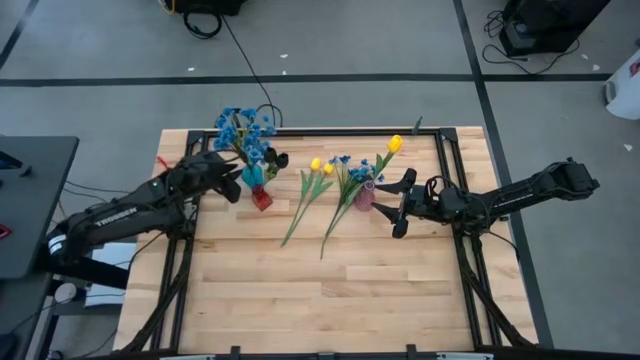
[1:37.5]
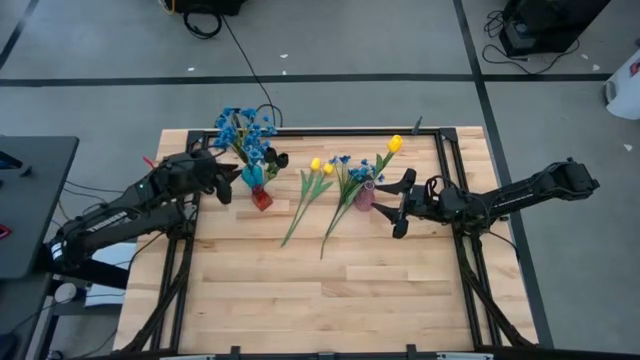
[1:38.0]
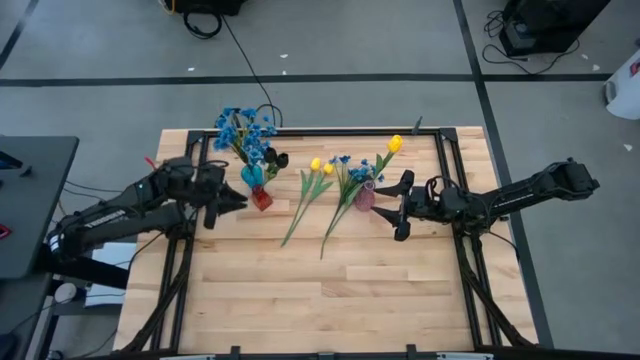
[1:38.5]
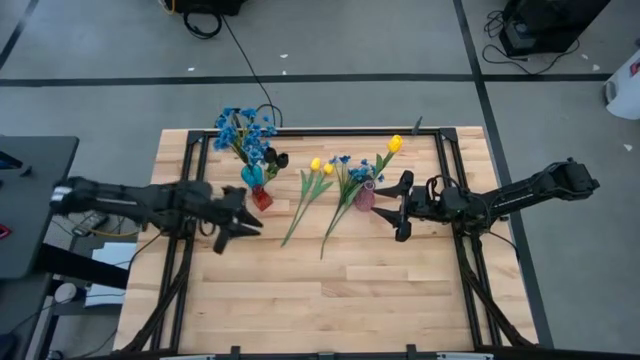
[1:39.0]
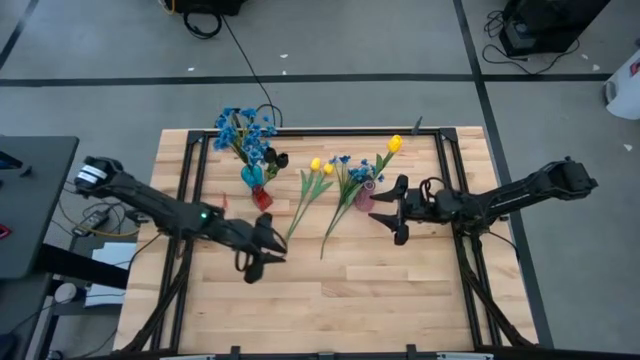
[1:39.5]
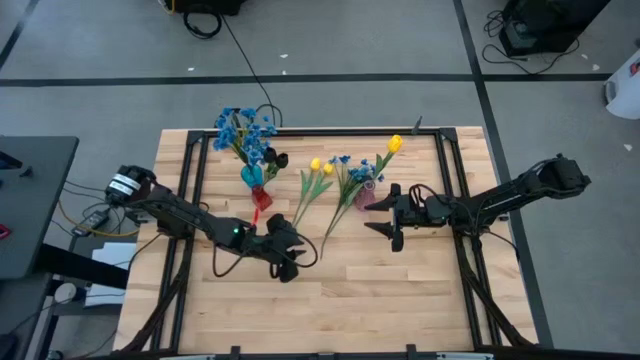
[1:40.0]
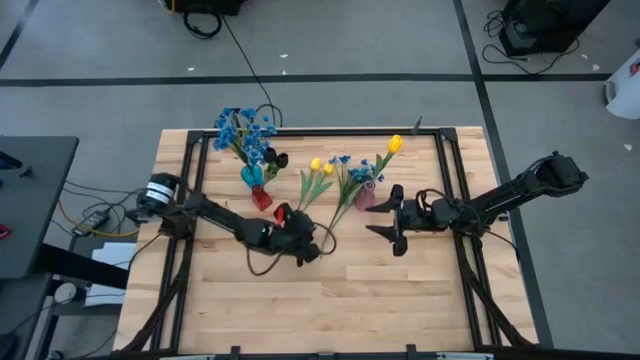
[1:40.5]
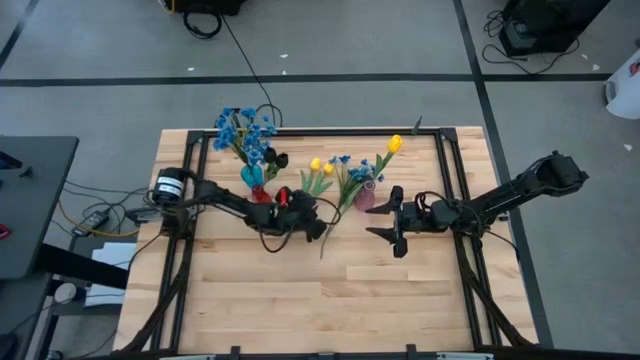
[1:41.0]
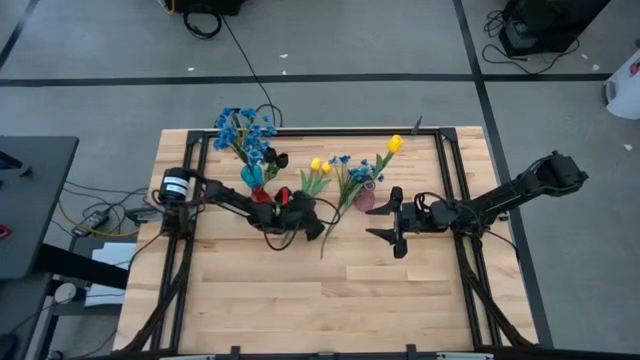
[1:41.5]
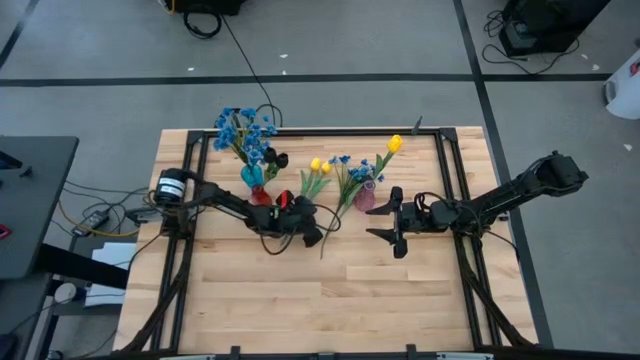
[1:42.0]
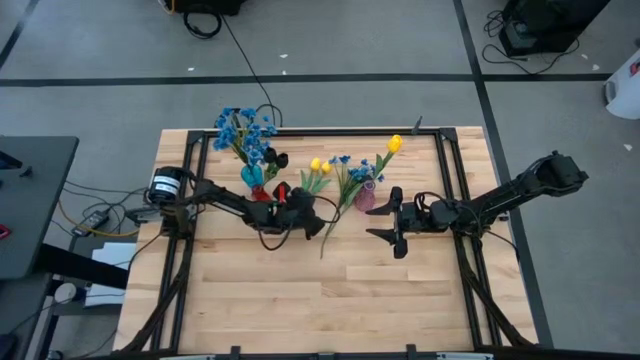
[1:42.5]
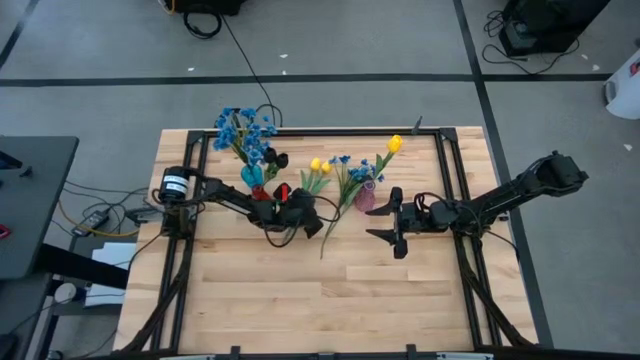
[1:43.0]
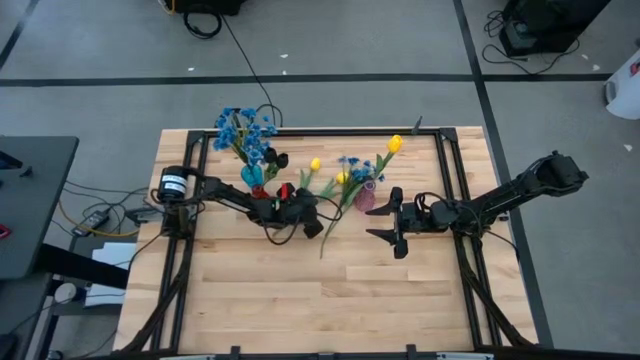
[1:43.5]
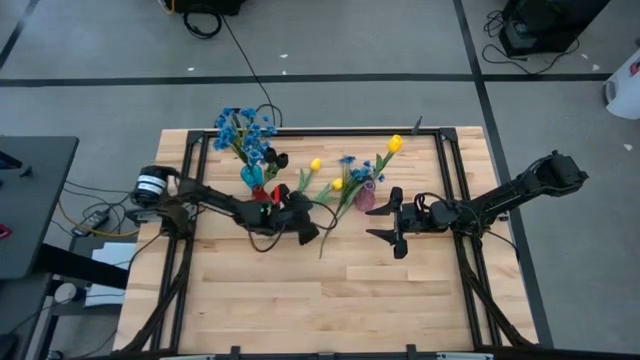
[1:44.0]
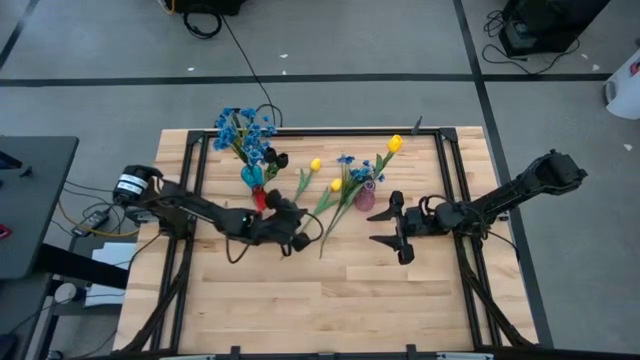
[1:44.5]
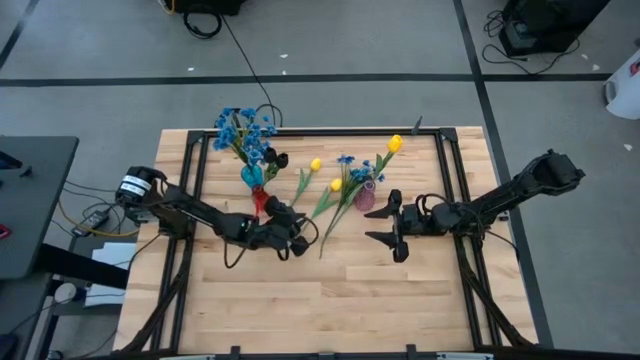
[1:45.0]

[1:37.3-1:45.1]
Task: Sort flowers into vase by color
Put the yellow flower into the pink vase

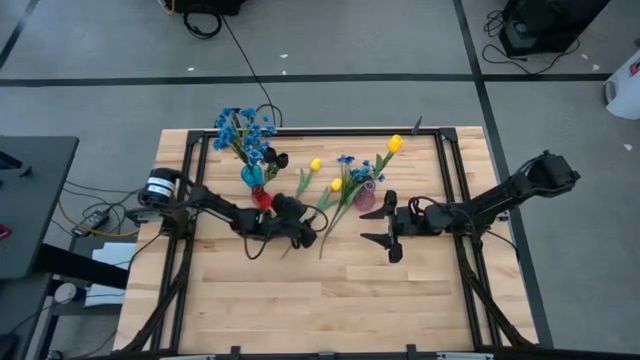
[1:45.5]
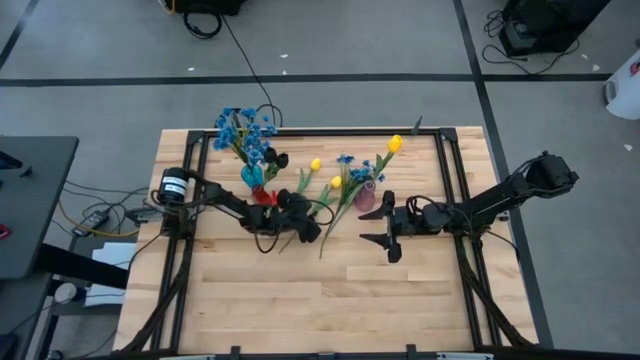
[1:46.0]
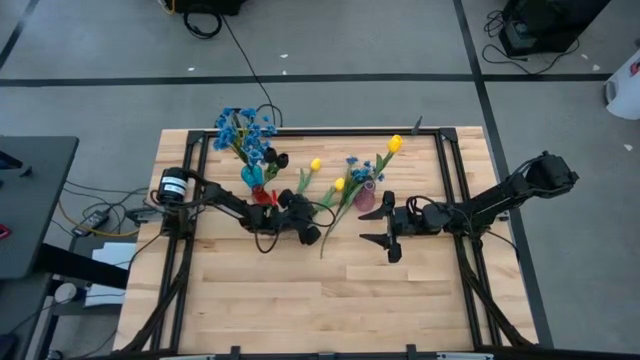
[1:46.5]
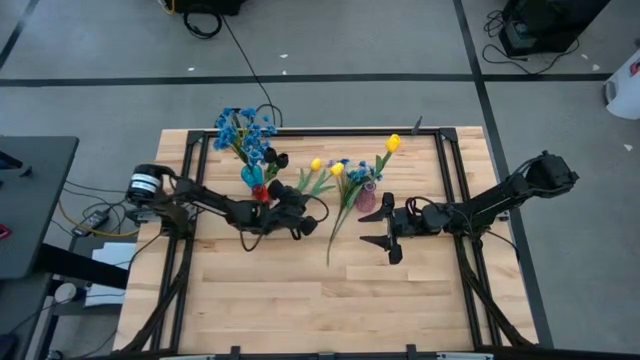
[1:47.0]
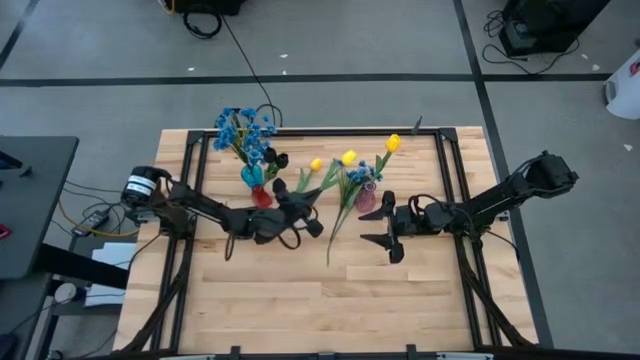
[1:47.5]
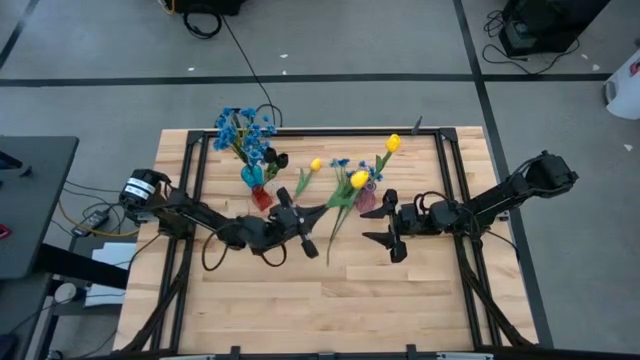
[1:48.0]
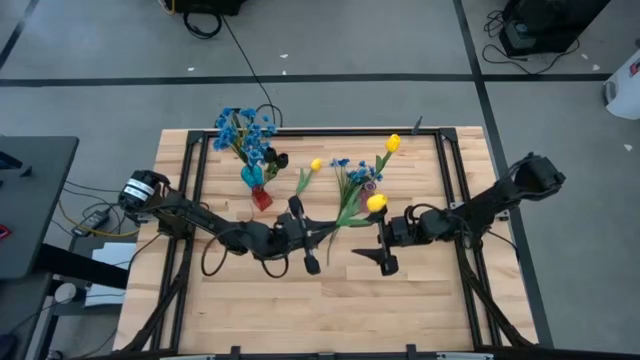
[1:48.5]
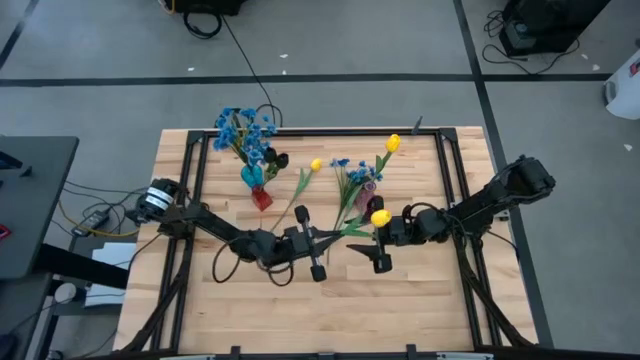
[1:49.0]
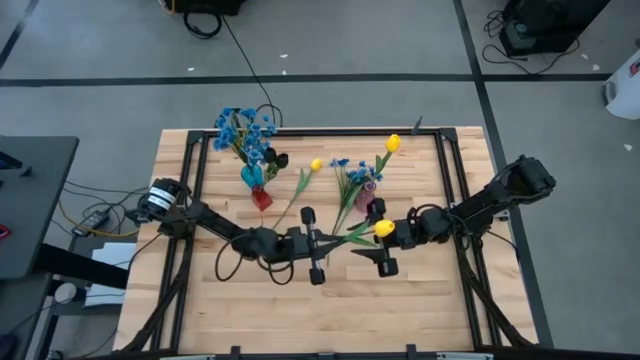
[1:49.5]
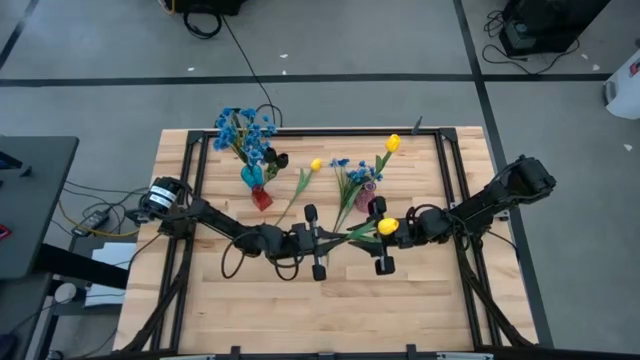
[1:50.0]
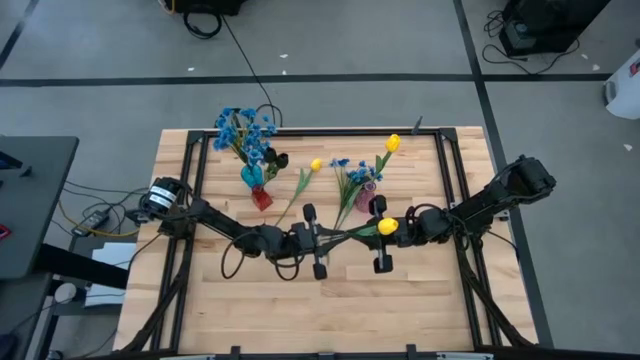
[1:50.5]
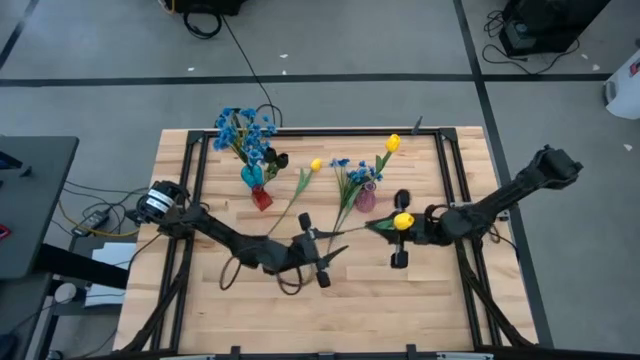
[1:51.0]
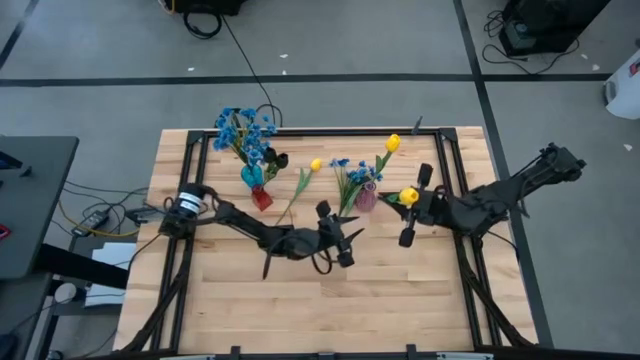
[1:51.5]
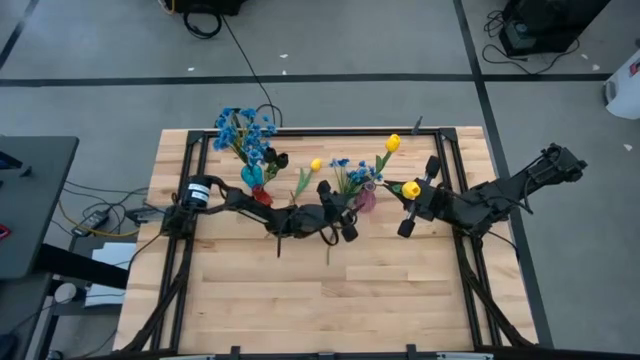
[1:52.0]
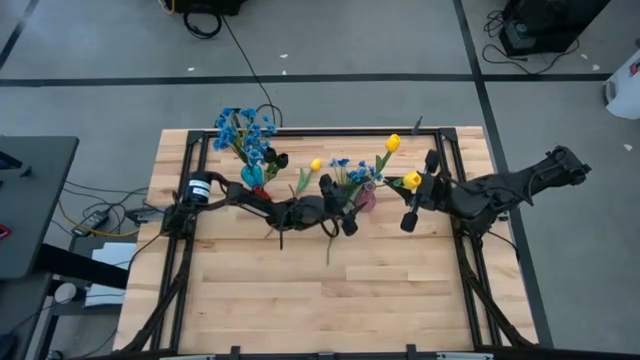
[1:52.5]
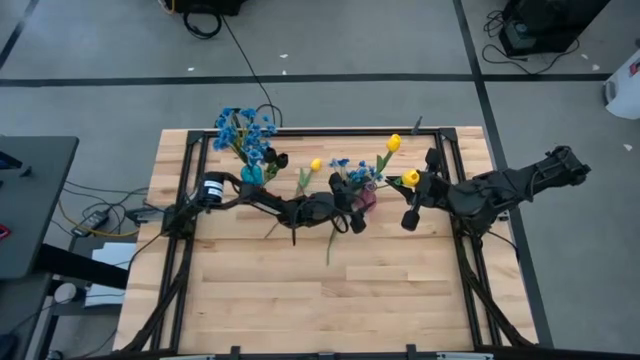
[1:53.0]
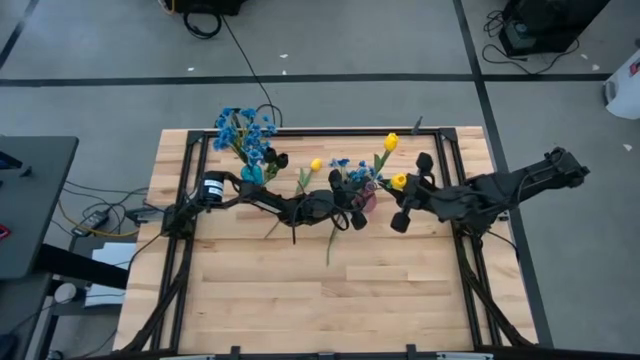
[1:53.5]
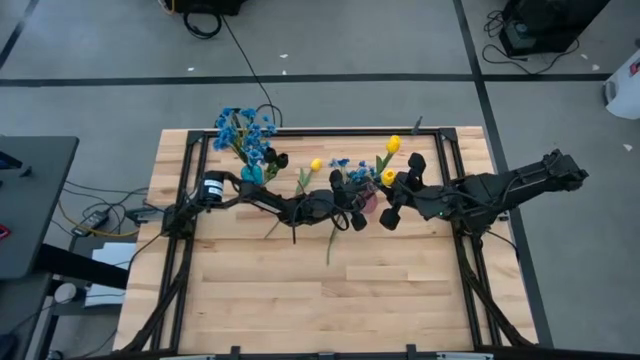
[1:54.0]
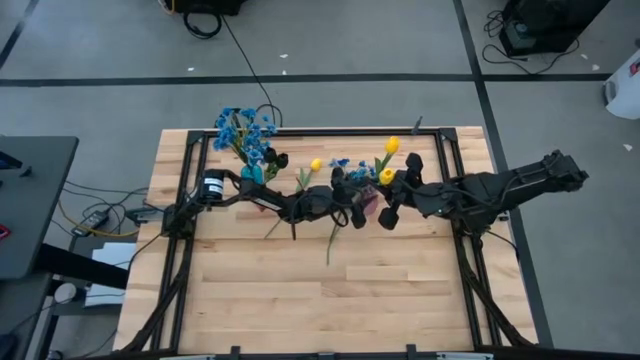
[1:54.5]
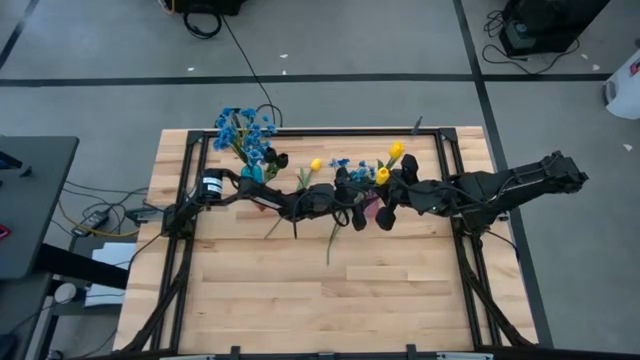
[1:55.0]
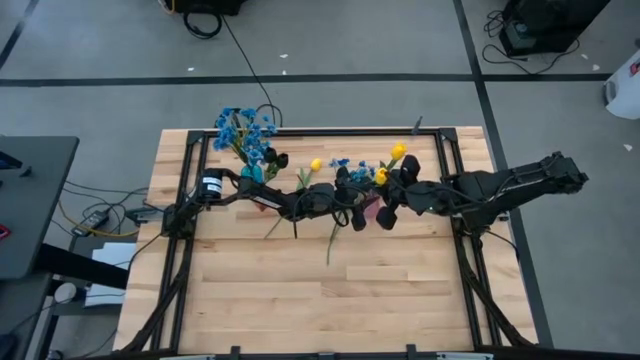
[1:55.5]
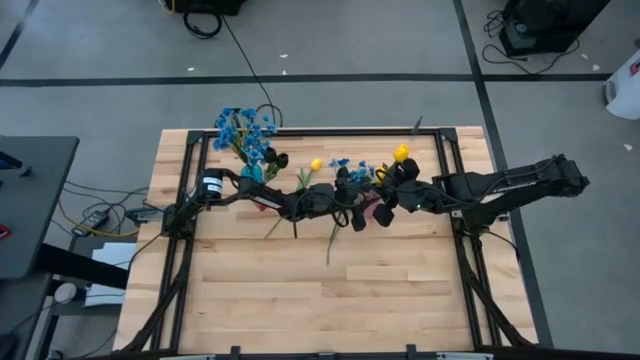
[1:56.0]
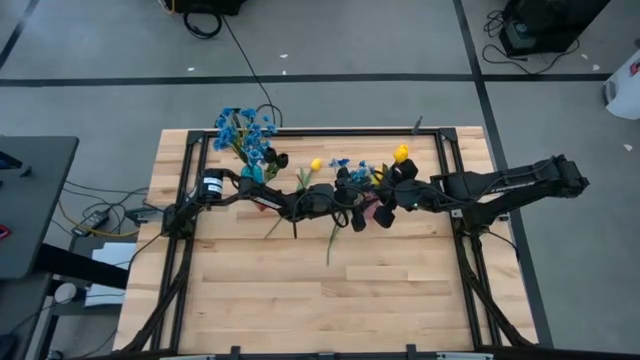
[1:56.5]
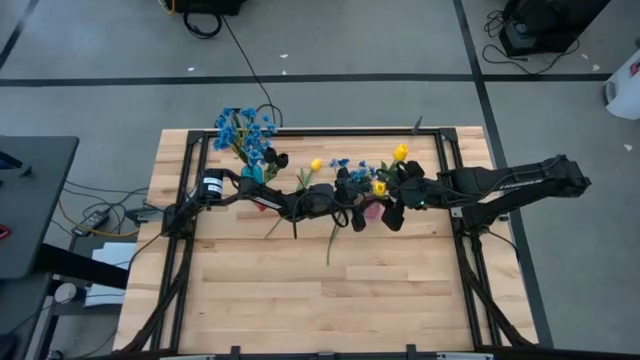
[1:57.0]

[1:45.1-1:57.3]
Put the yellow flower into the pink vase

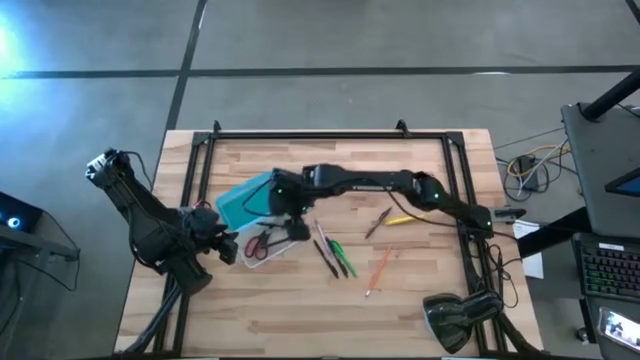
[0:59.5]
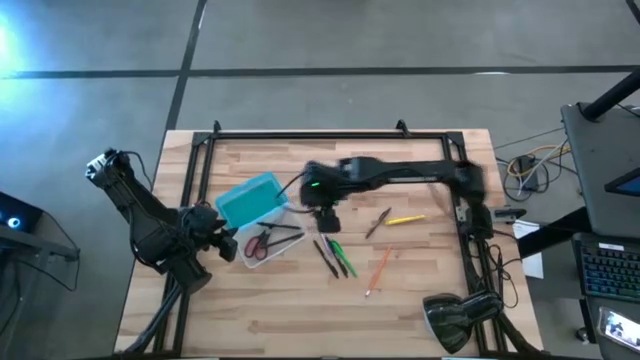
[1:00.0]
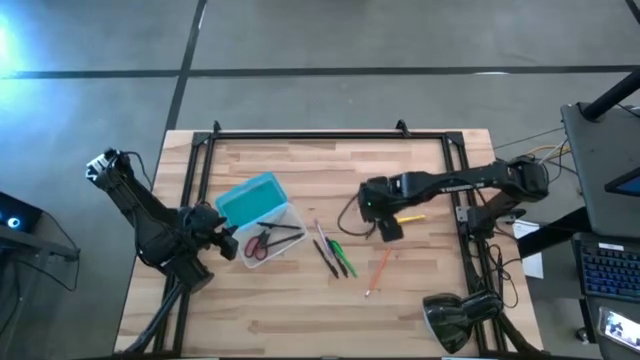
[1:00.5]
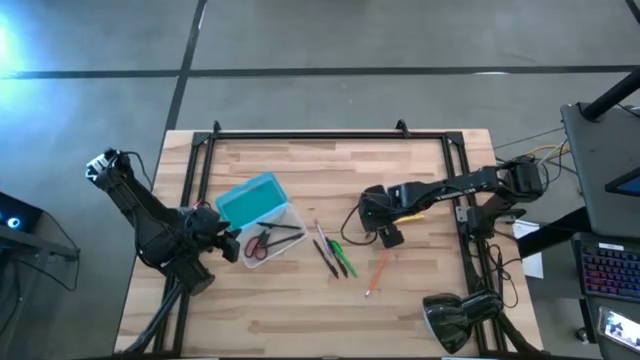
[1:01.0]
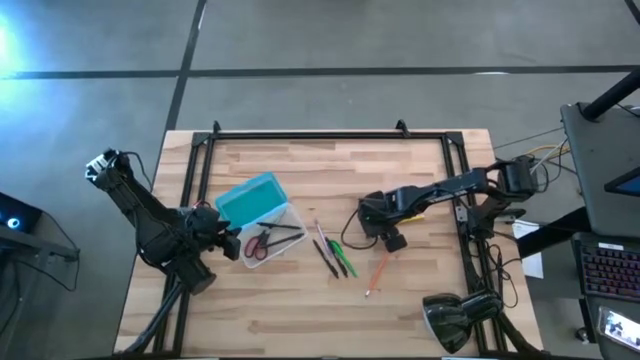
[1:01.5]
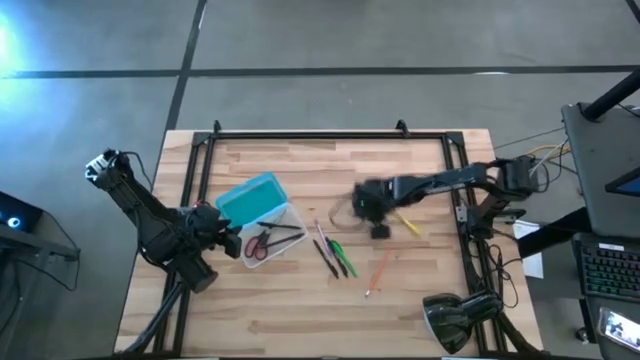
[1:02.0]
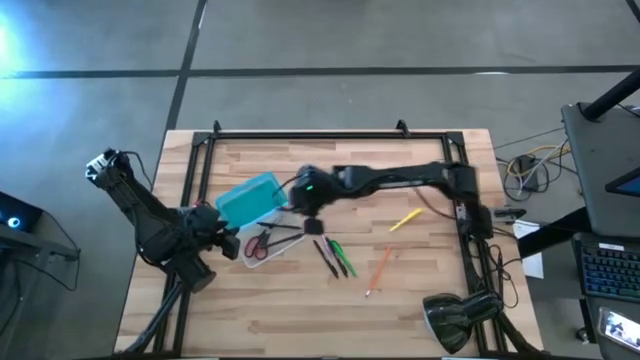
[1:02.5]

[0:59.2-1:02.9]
Task: Pick & place school supplies into a supply box
Put the brown pen into the blue supply box
